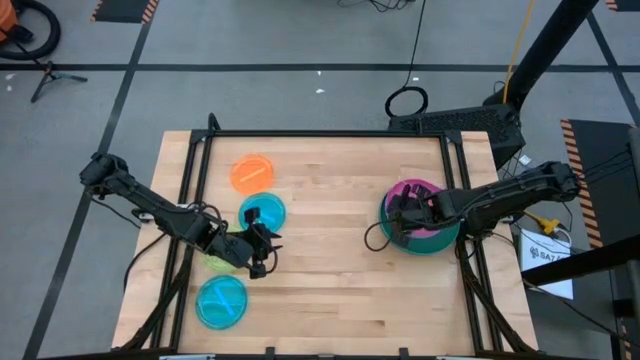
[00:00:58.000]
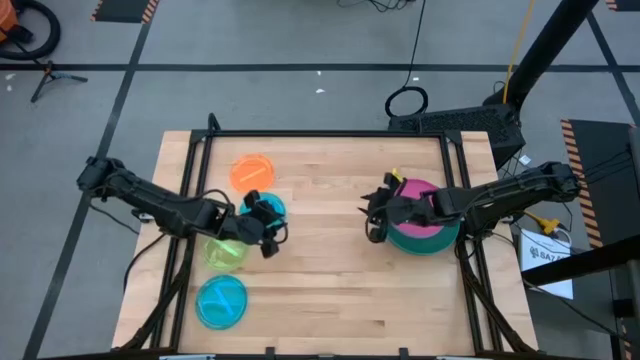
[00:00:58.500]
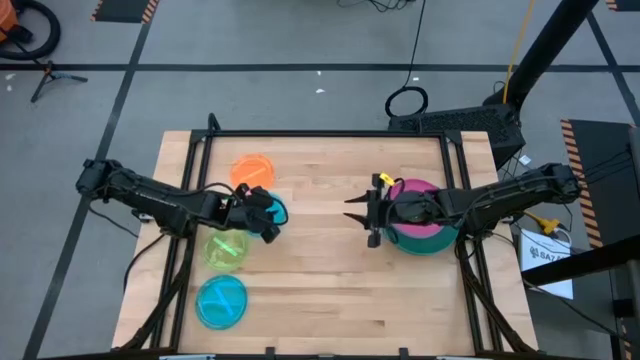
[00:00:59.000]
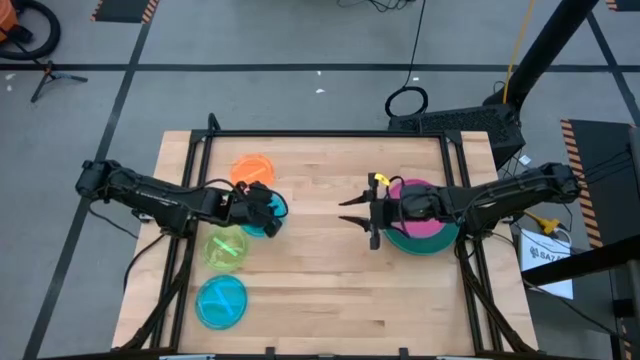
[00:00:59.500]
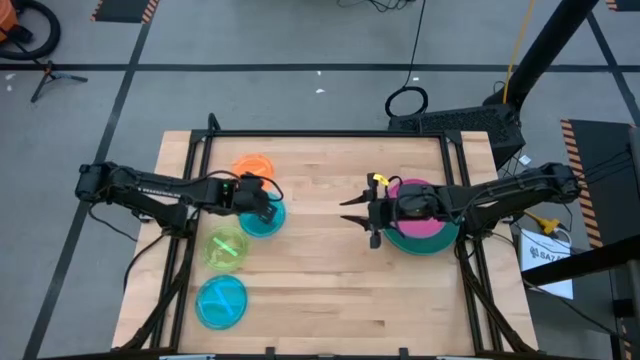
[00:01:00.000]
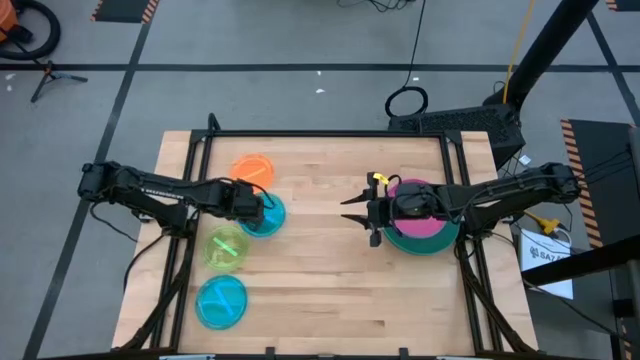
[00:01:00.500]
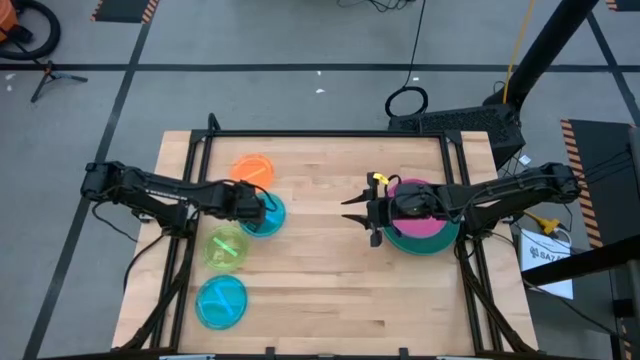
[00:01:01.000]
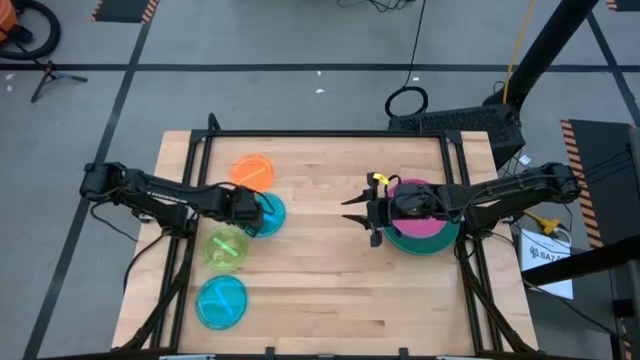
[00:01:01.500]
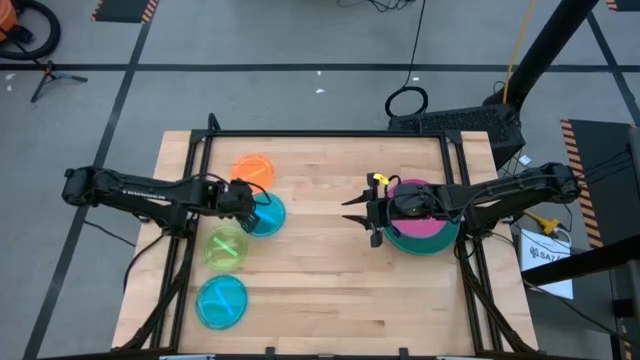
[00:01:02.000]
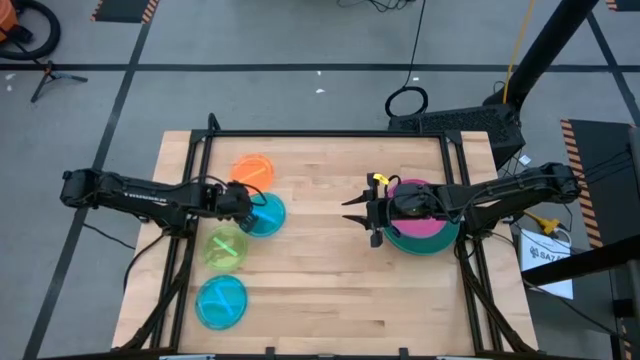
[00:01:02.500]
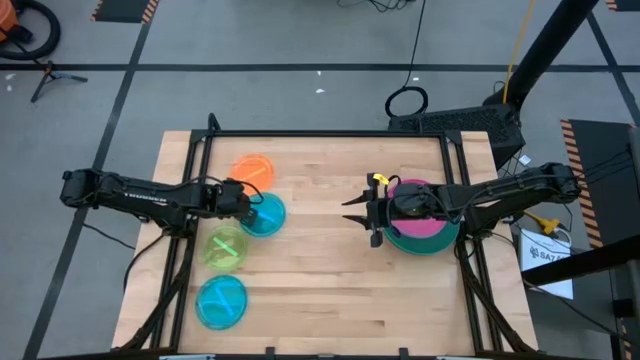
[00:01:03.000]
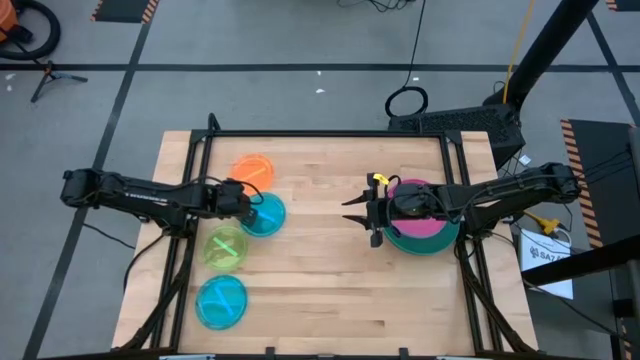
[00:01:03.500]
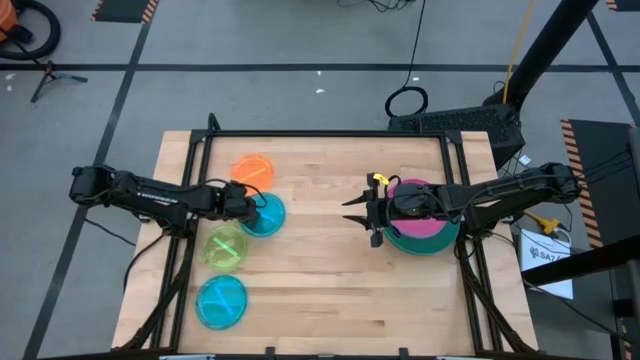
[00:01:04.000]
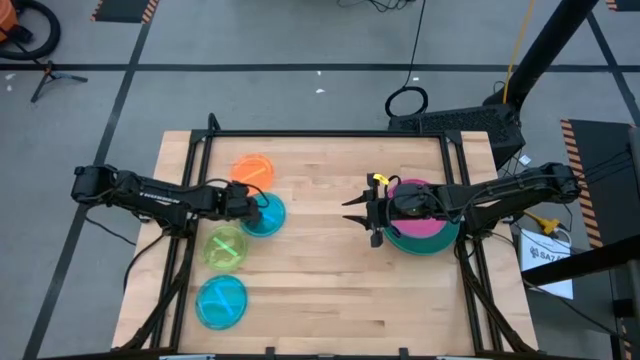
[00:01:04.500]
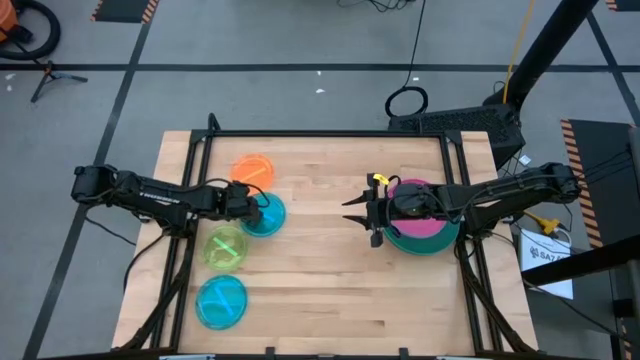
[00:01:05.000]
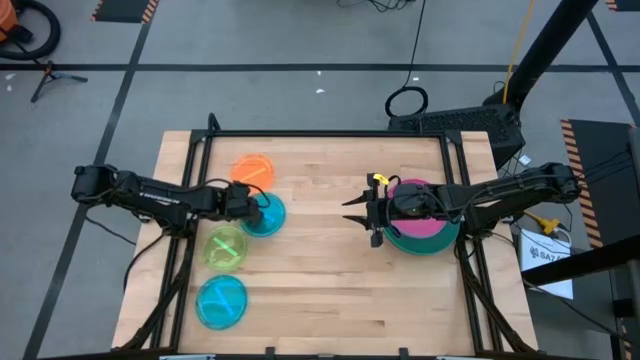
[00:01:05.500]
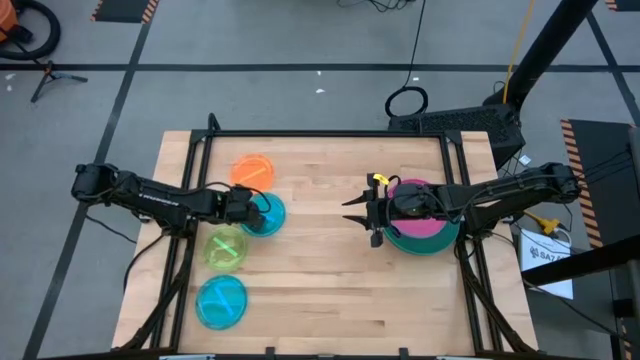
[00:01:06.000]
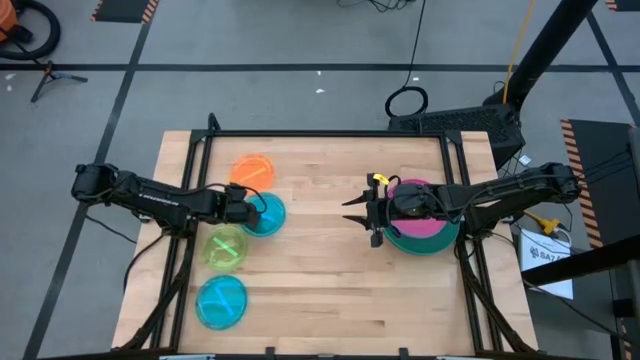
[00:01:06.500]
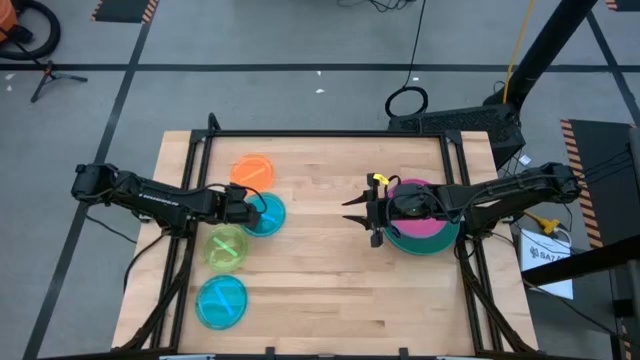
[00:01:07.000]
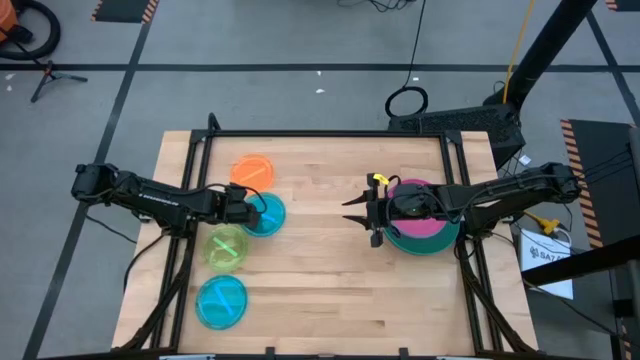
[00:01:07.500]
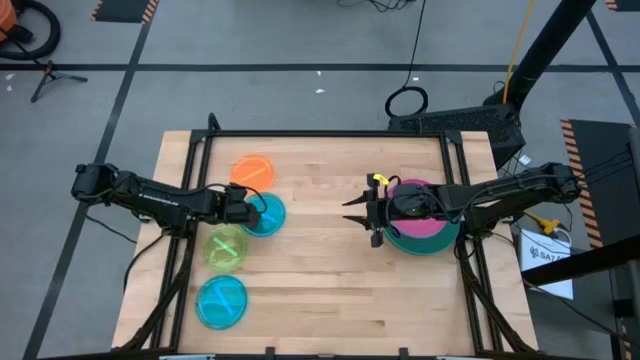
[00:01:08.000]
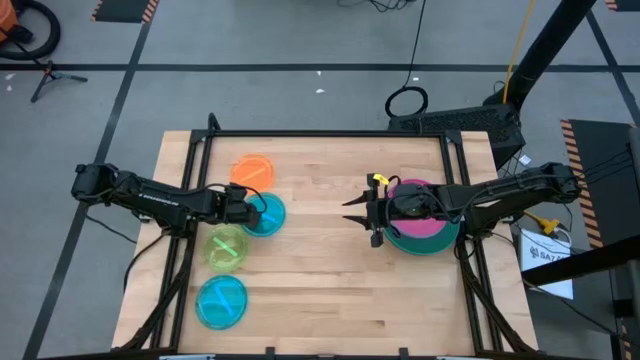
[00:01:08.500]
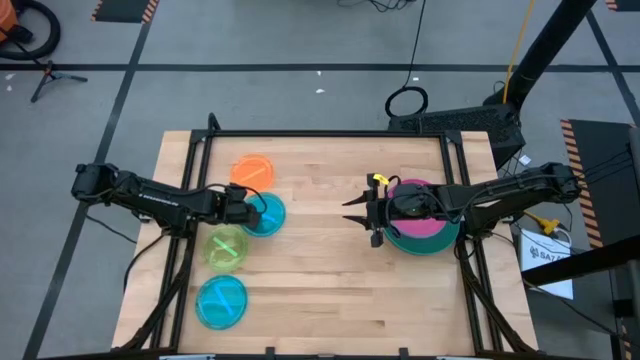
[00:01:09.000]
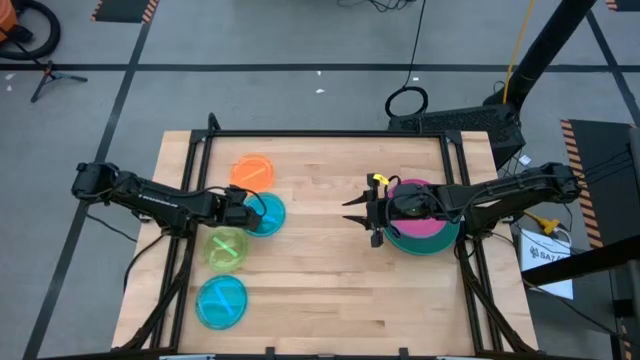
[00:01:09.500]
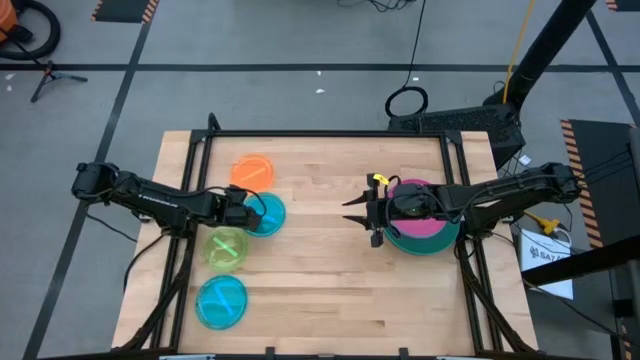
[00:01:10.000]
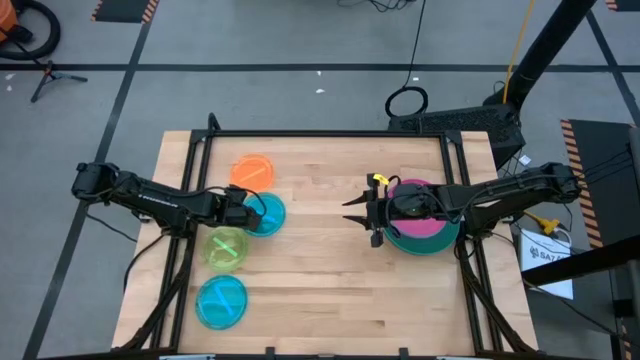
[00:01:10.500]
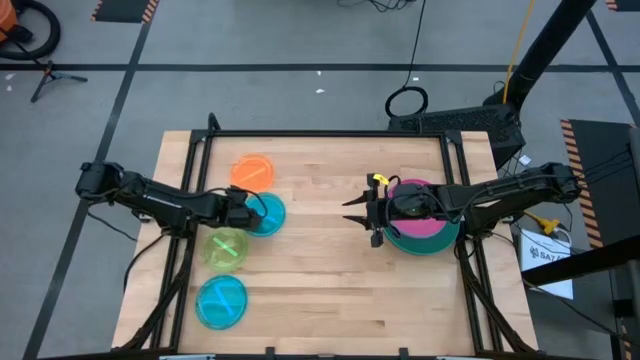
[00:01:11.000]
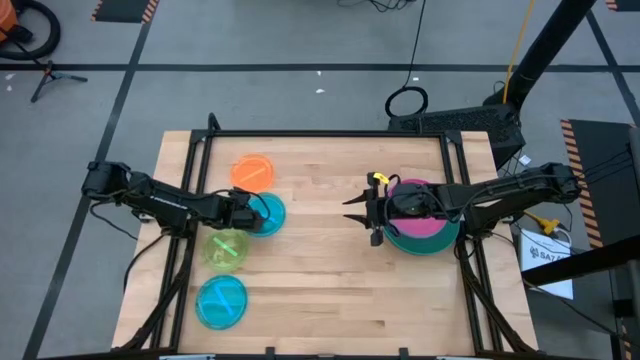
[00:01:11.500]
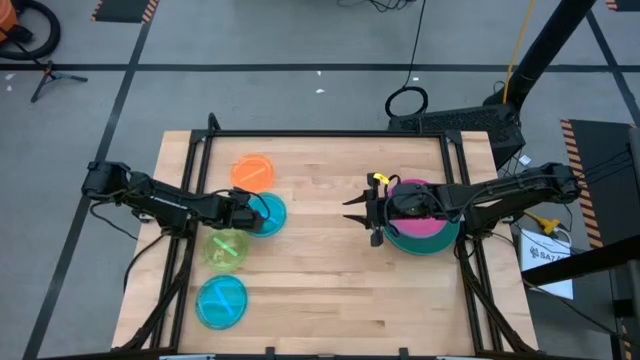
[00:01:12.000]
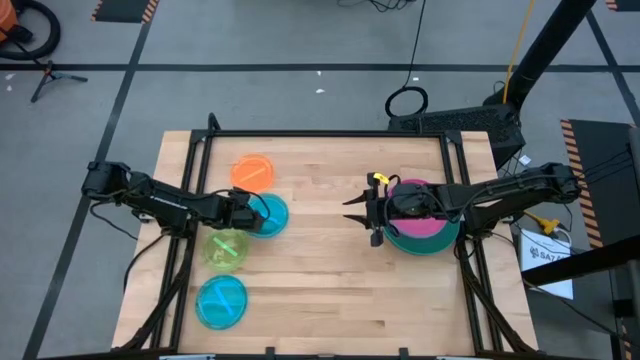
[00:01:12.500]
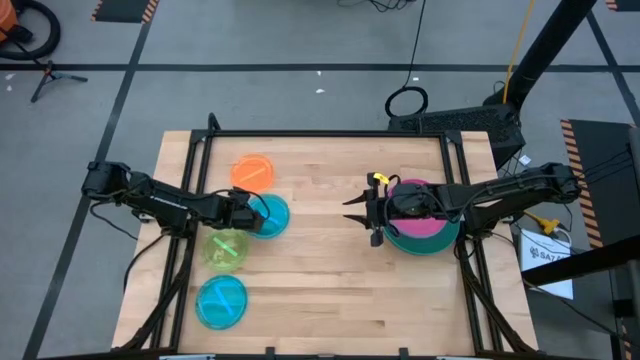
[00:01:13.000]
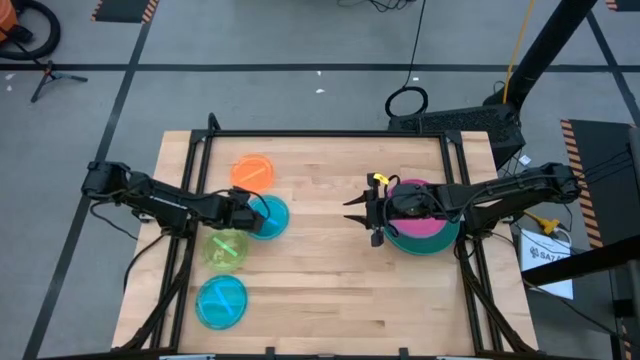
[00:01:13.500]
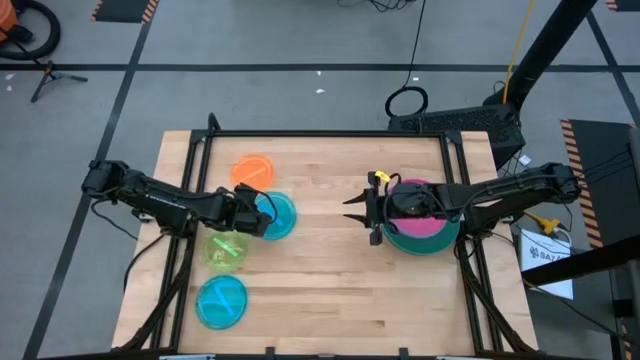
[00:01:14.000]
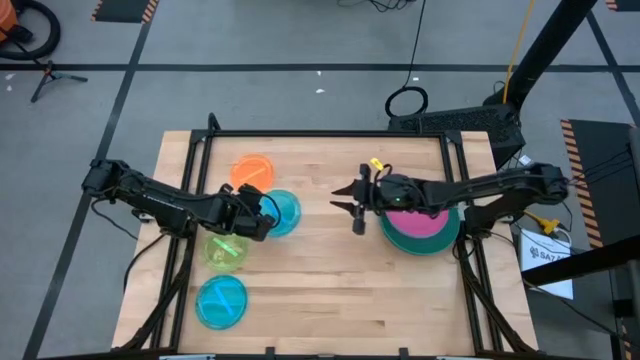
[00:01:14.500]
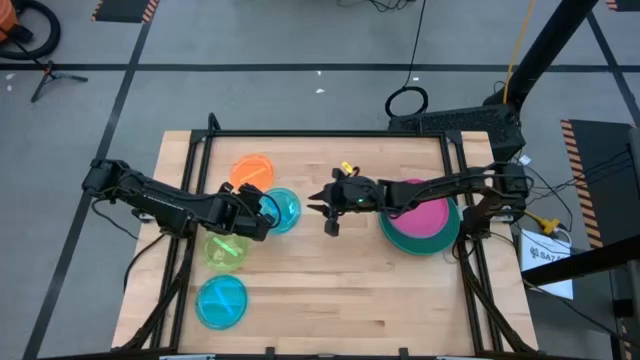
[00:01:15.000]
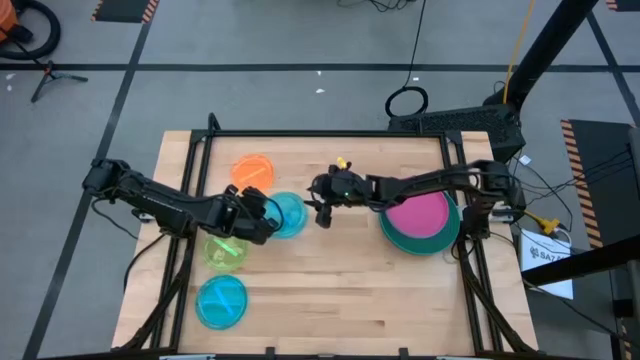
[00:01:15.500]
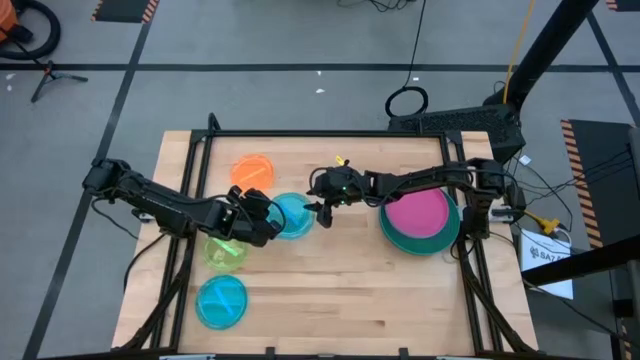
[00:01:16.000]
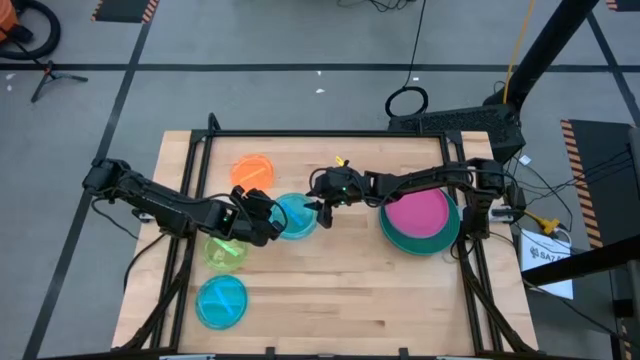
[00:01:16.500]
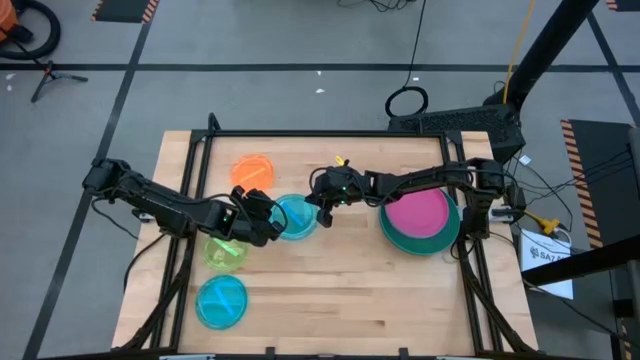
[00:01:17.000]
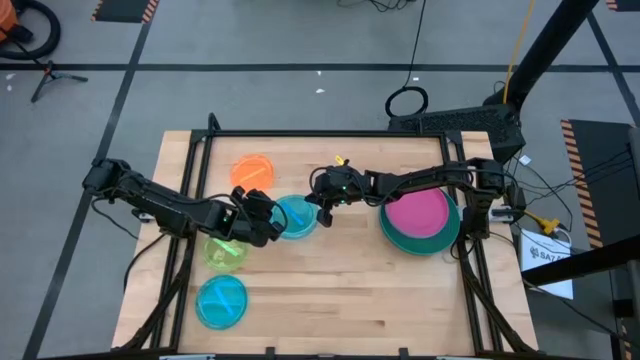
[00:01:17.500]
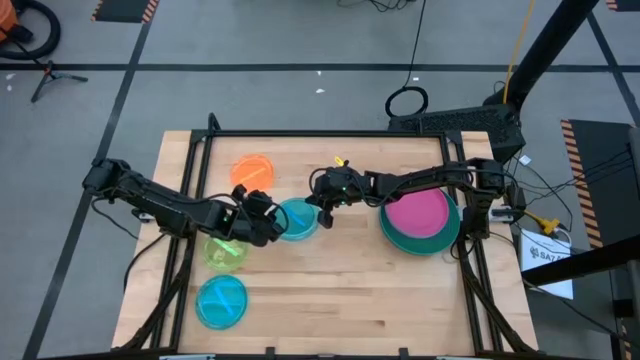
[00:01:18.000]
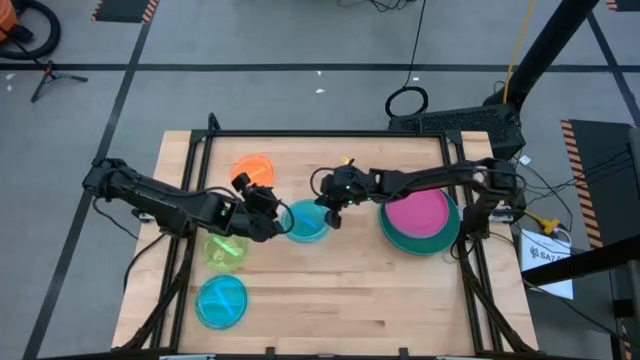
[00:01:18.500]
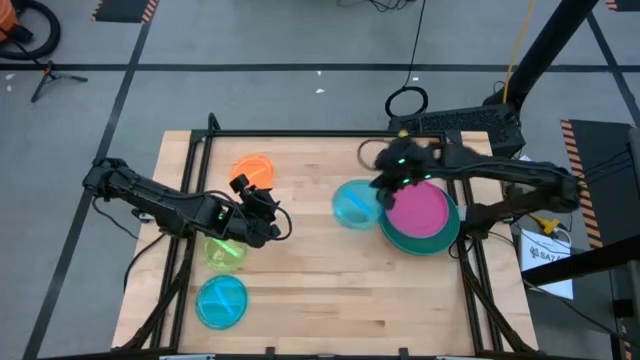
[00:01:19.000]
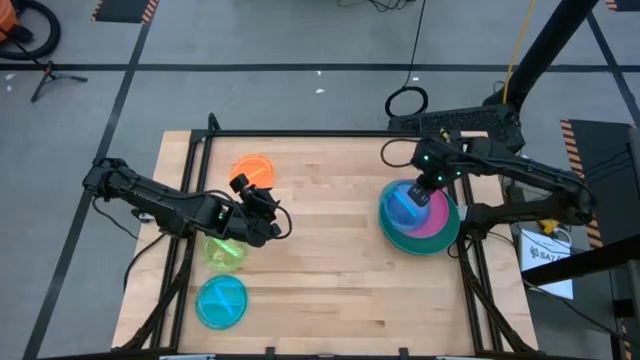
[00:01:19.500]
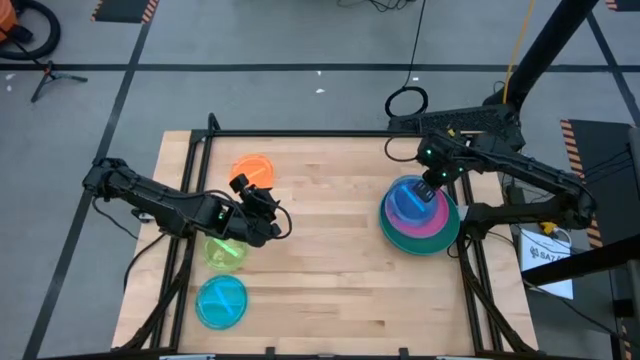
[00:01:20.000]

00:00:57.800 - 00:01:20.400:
Task: Stack plastic plates
Stack the top light blue plate on top of the pink plate
